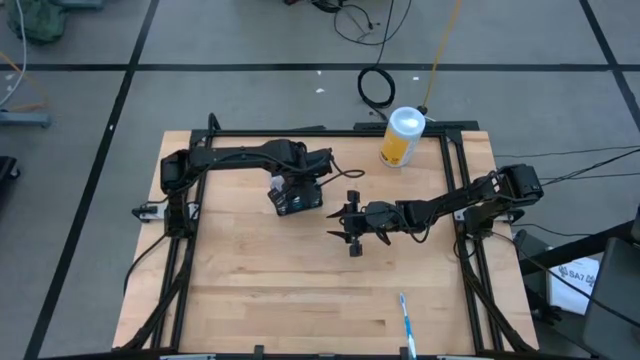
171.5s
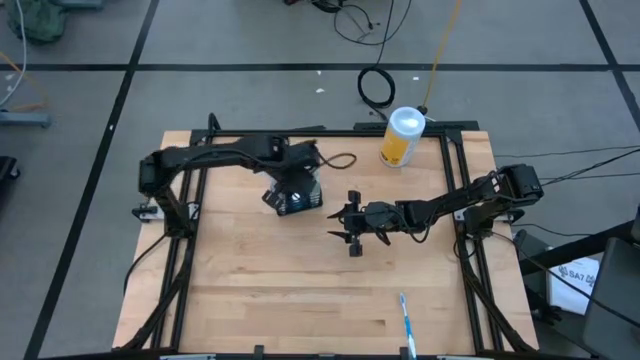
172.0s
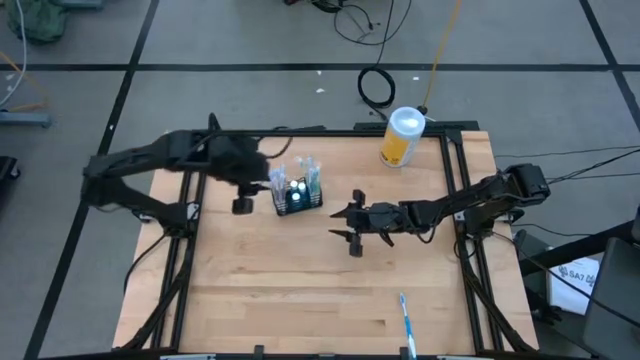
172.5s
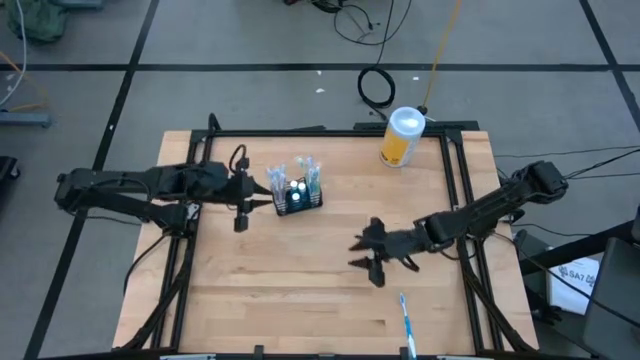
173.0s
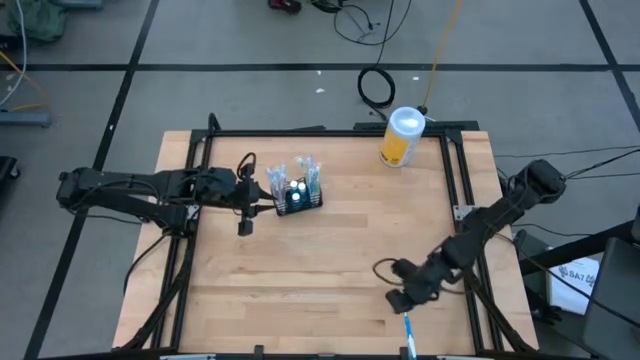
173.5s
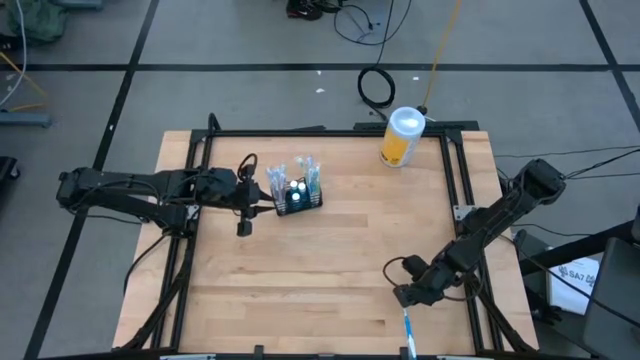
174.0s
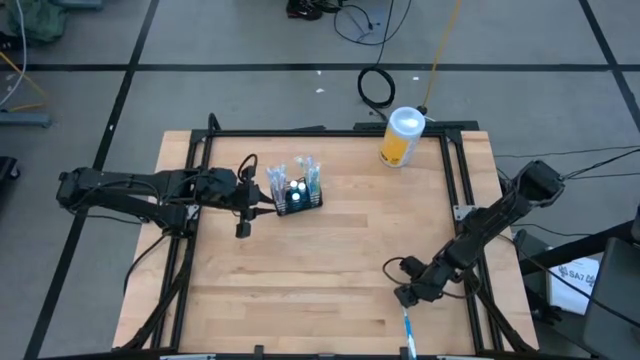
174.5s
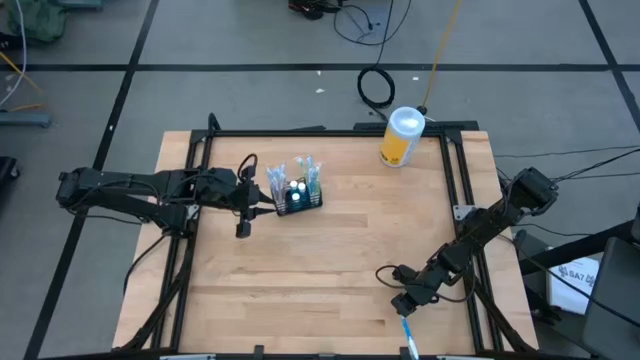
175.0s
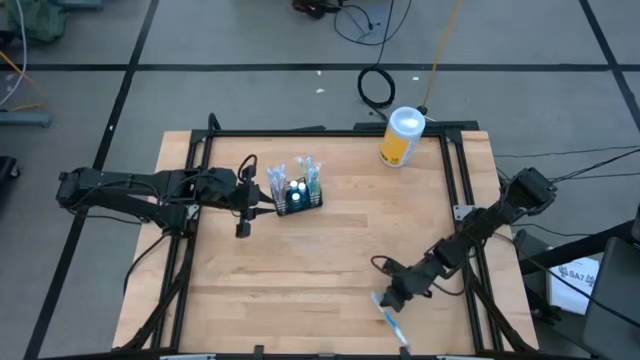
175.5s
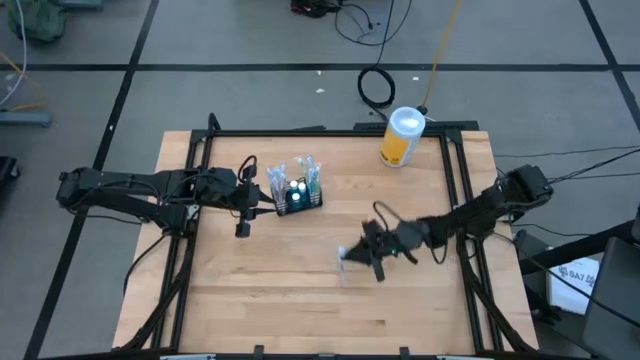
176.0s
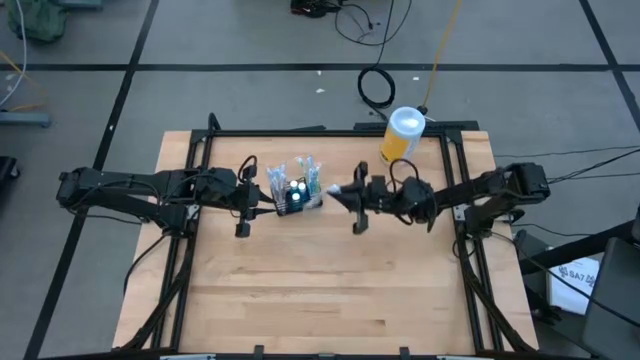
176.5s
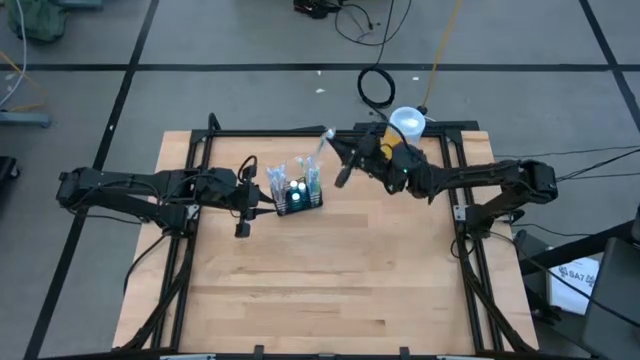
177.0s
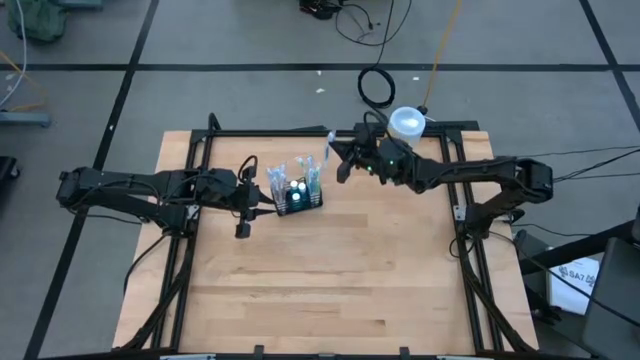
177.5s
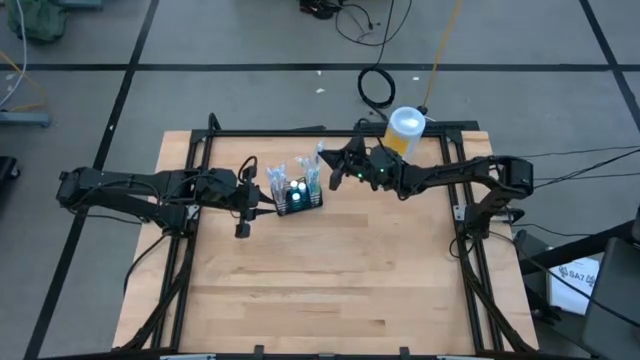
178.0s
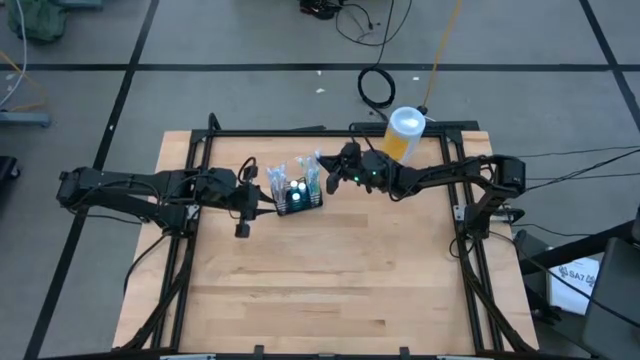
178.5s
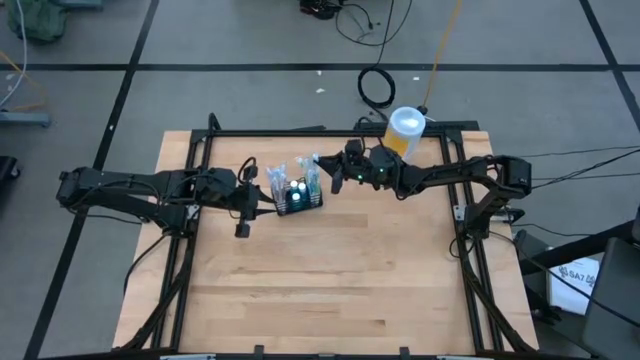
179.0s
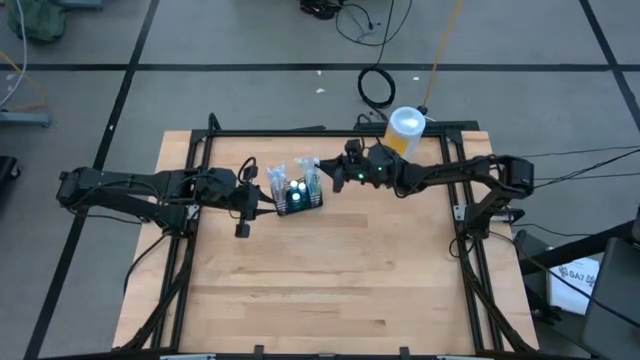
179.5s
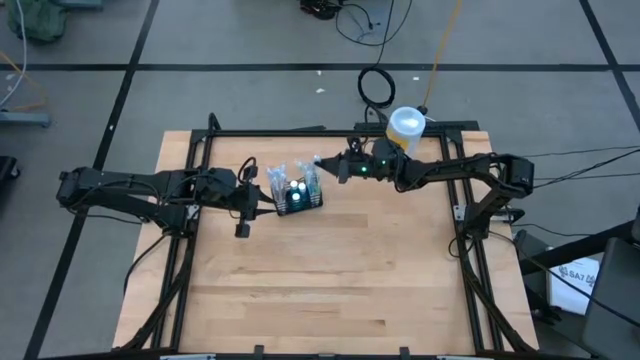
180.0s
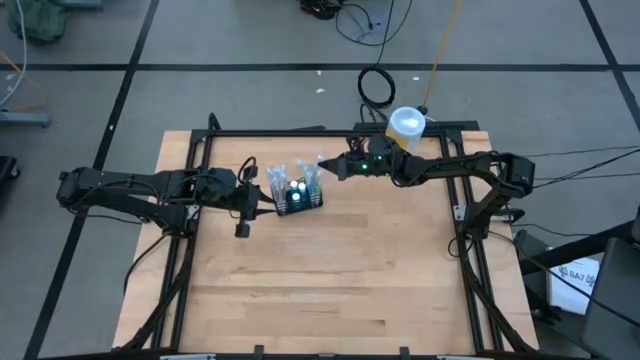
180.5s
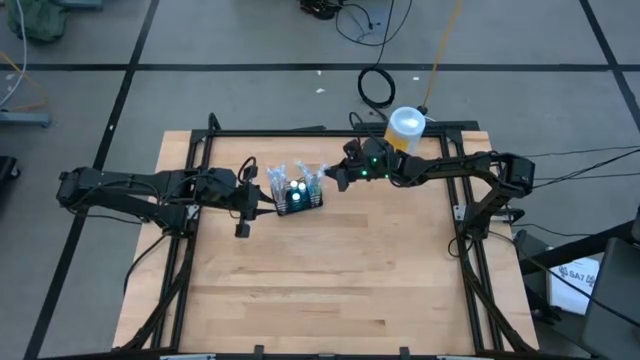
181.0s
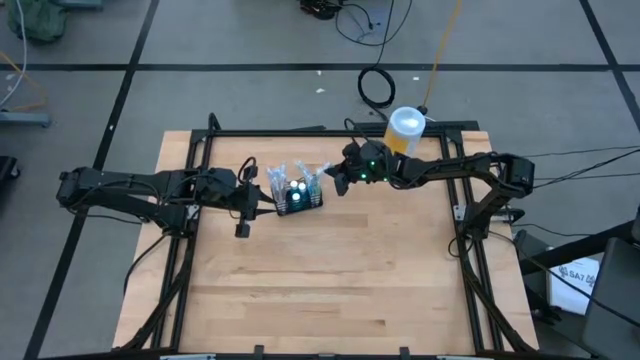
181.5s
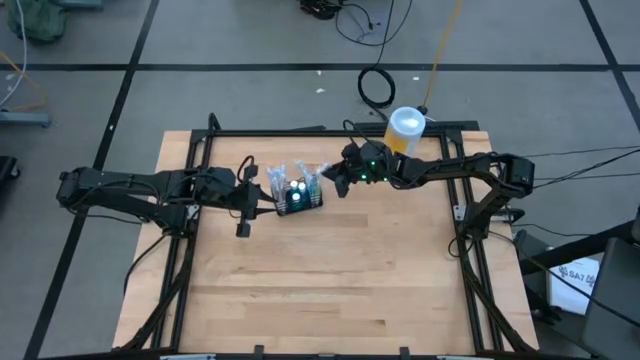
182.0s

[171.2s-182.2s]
Task: Pick & Place toothbrushing station
Put the blue toothbrush into the black mesh organizer

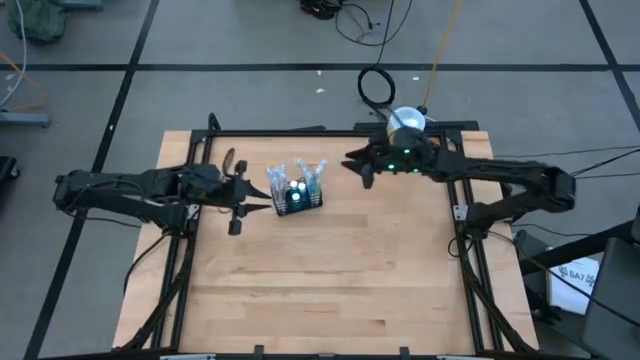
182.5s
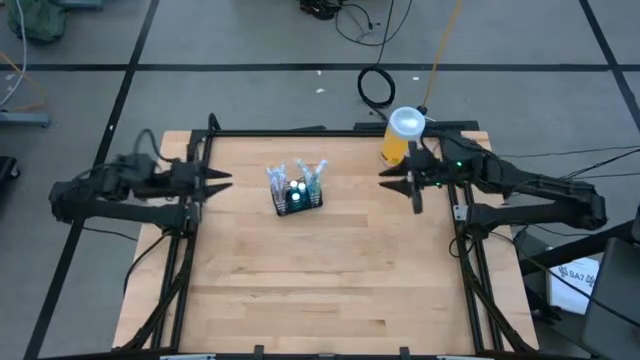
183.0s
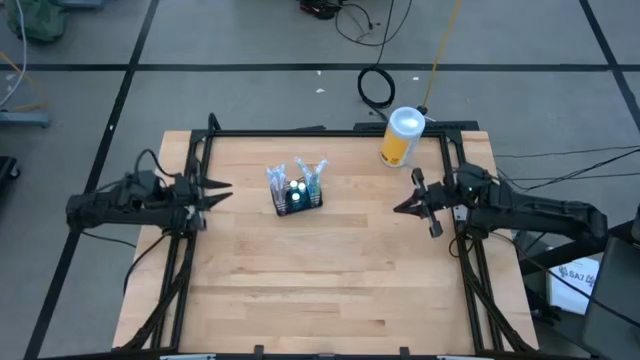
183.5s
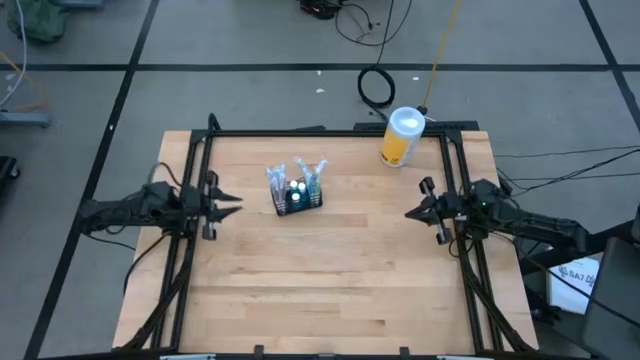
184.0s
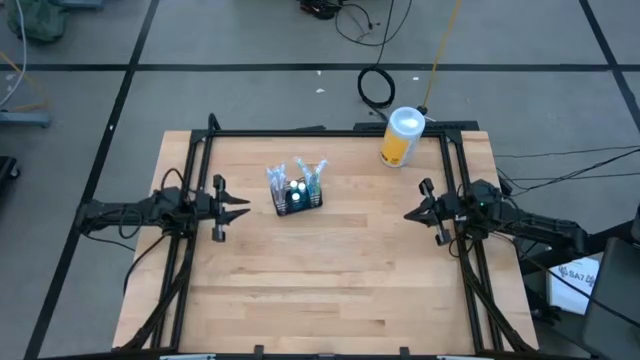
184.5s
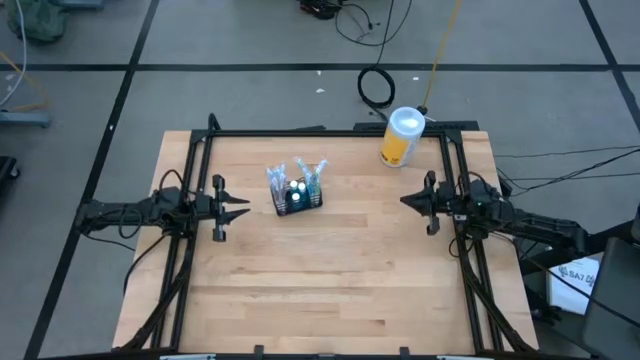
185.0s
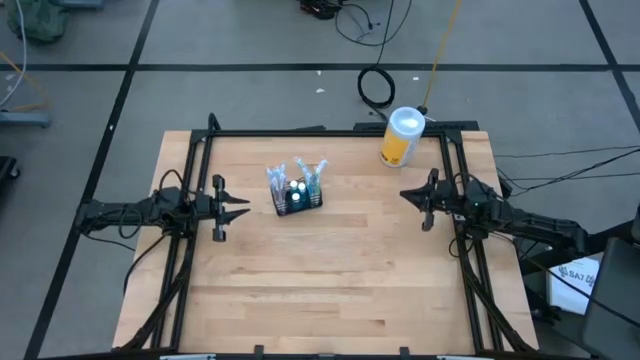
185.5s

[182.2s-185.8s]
Return to Home Position

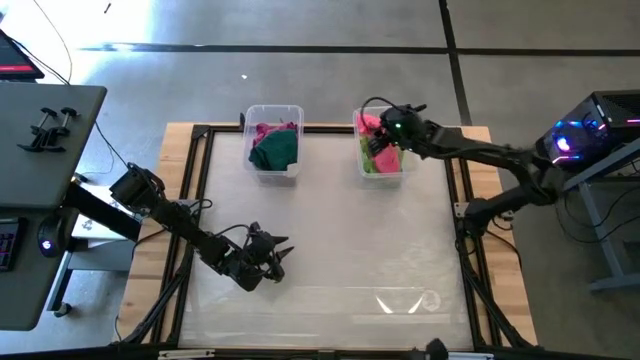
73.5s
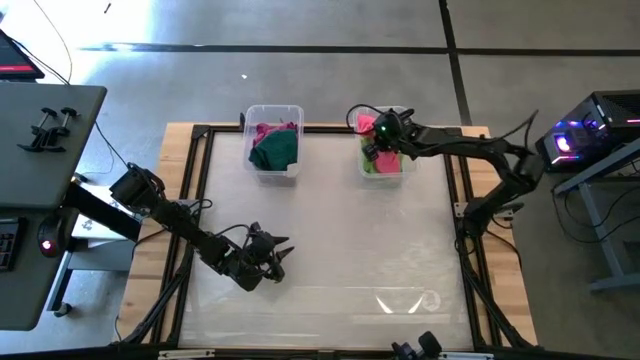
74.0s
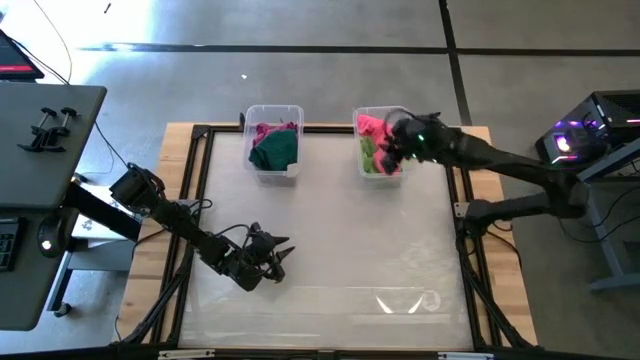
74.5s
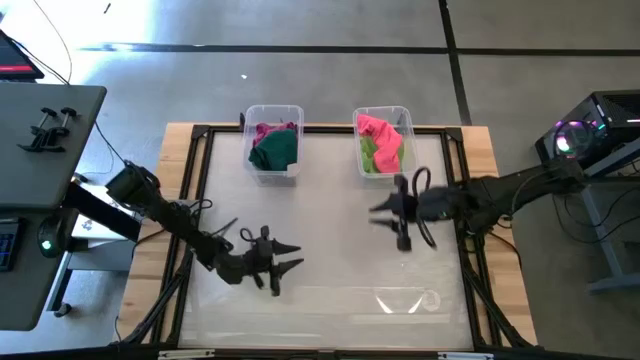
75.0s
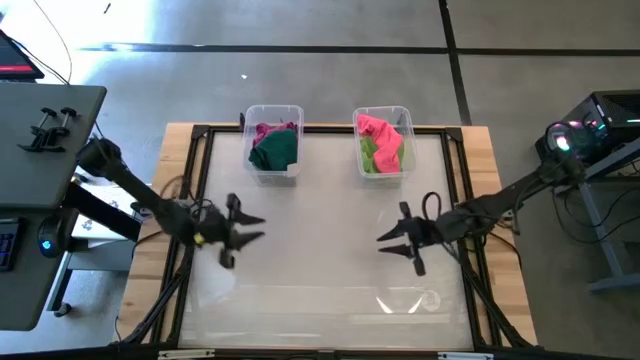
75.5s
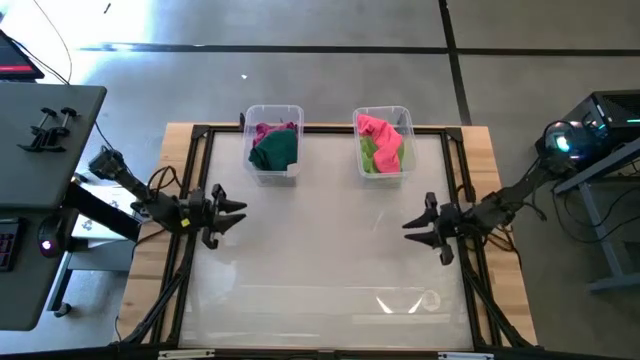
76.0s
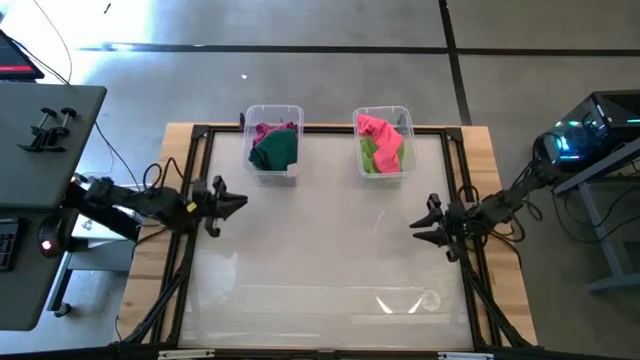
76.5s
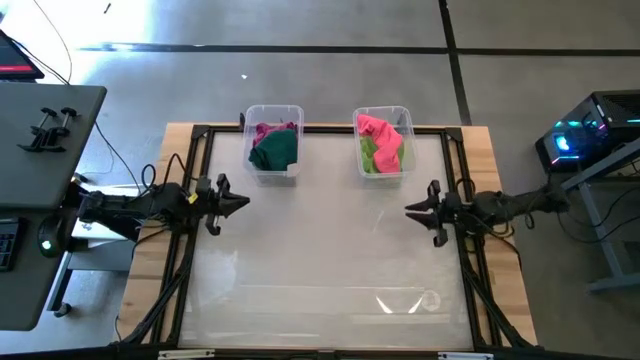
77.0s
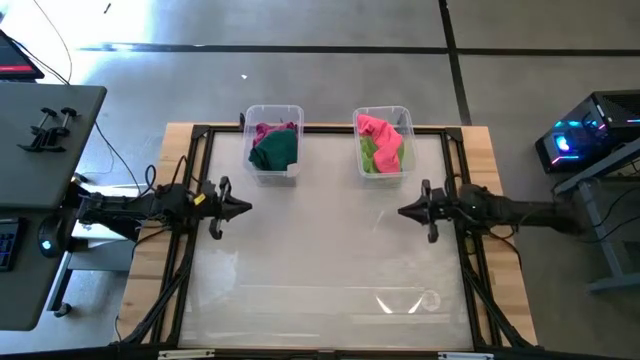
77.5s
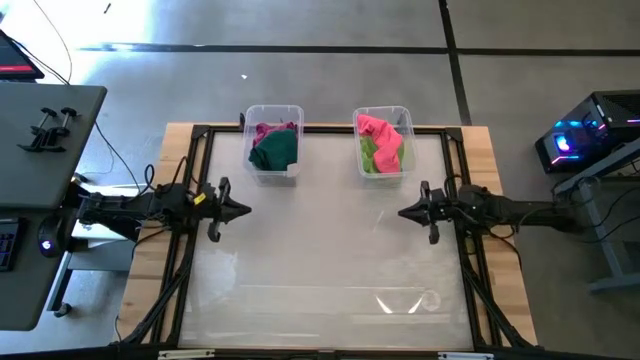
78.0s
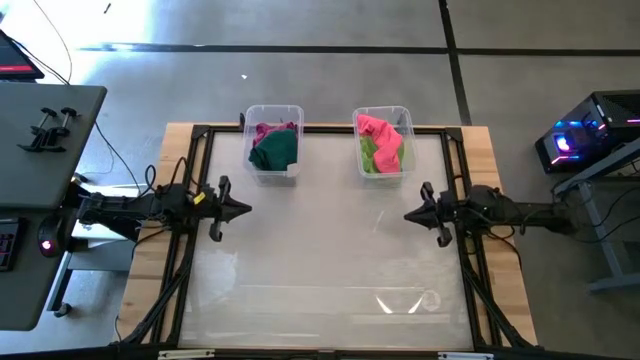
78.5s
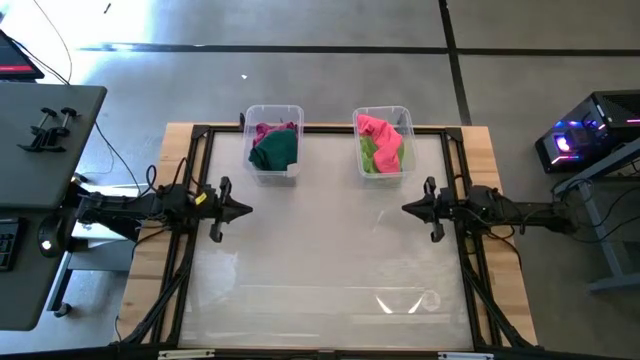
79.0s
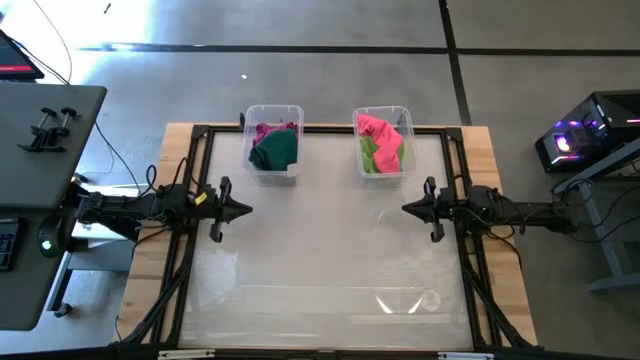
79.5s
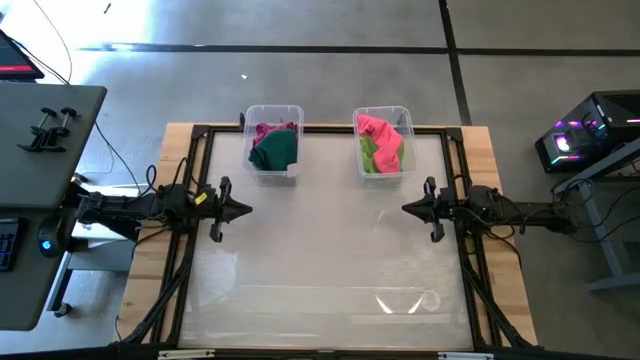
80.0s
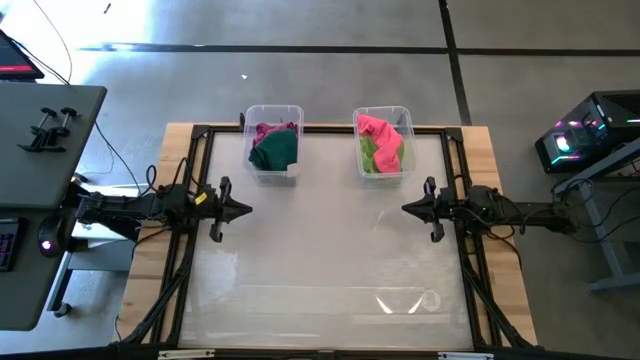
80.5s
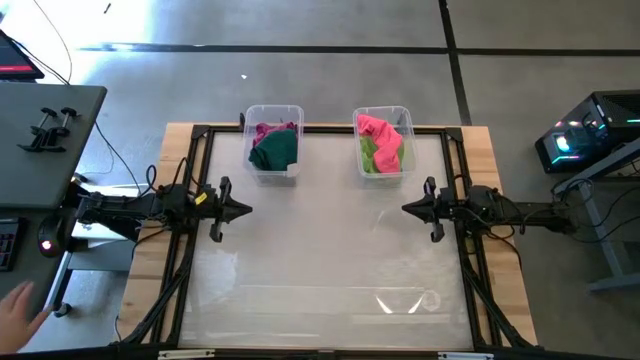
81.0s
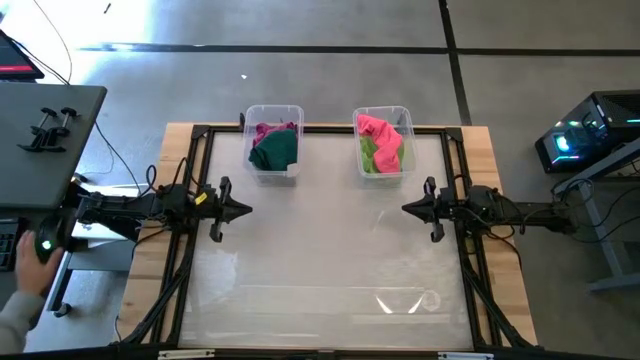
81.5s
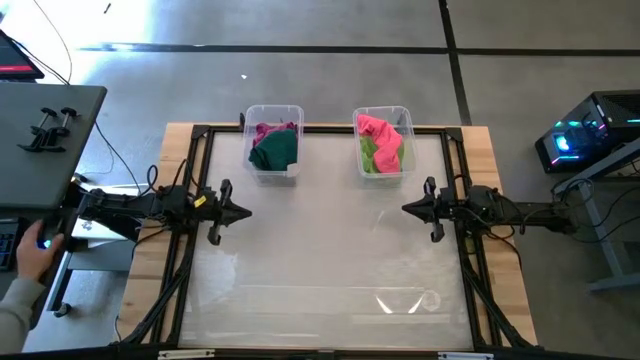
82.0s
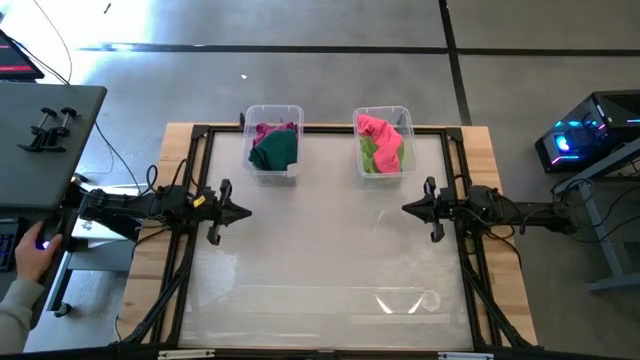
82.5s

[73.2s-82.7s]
Task: Sort towels by color in basket
Return to Home Position
